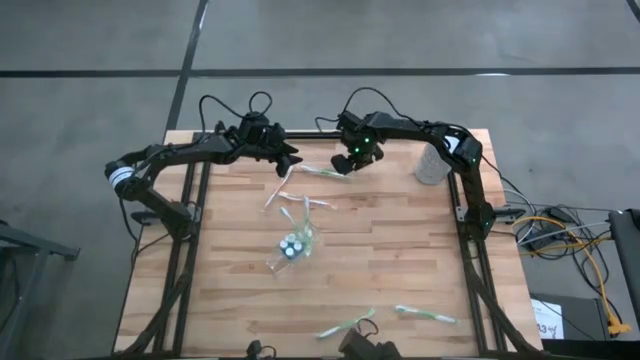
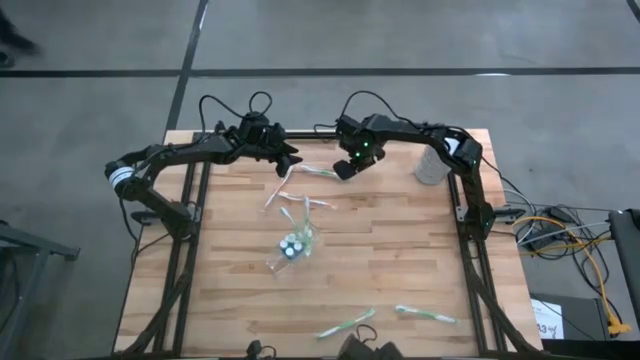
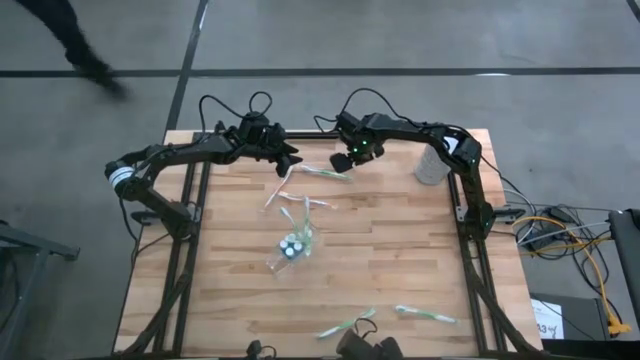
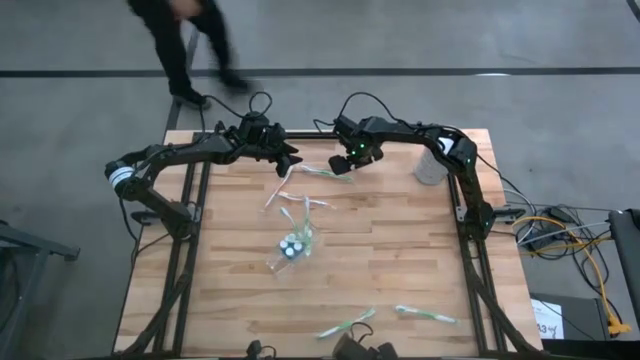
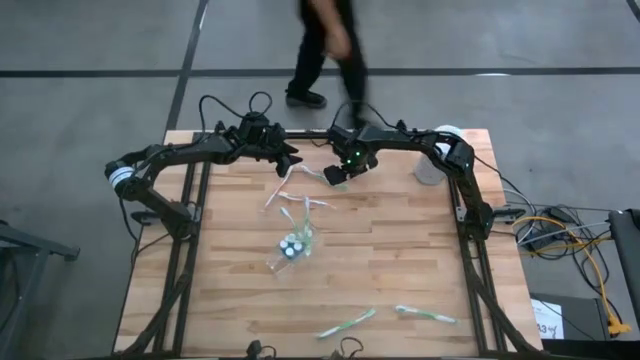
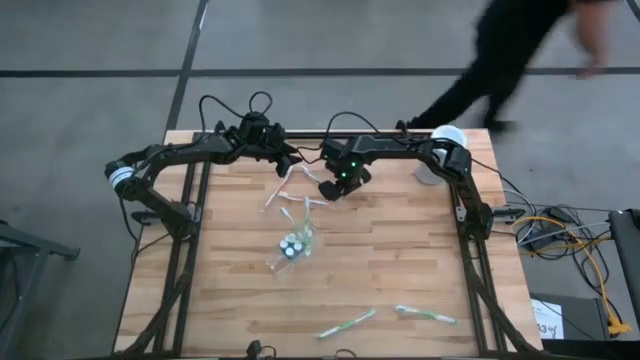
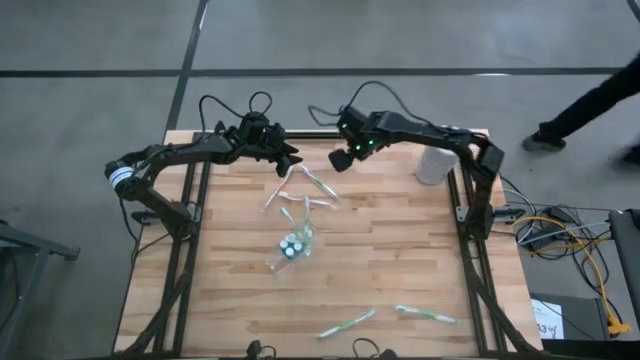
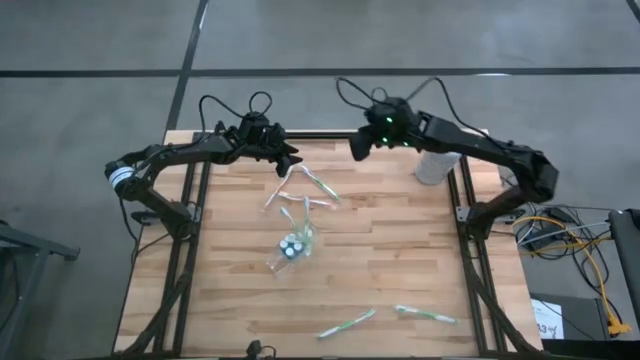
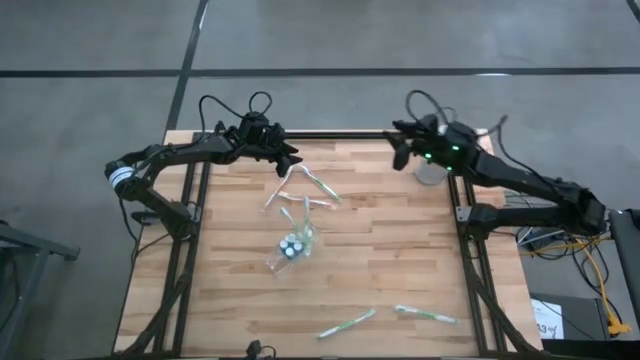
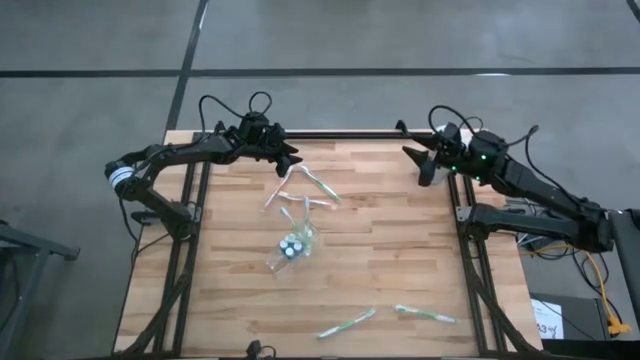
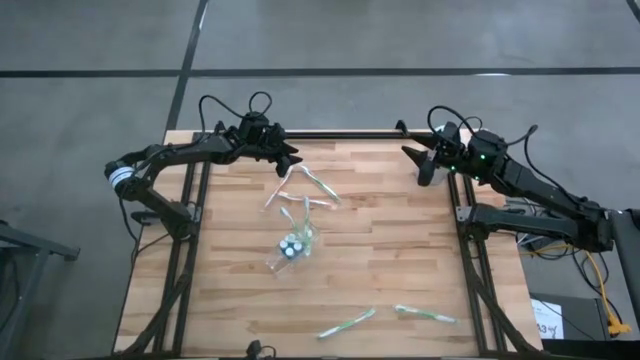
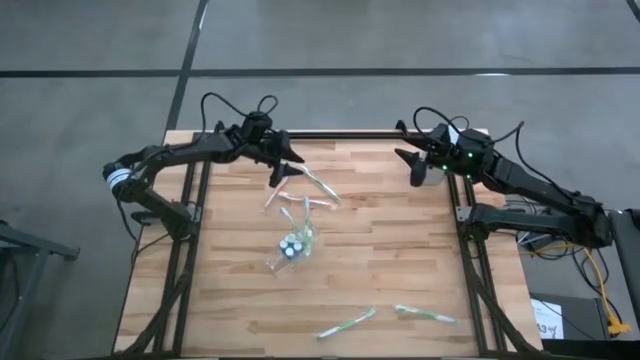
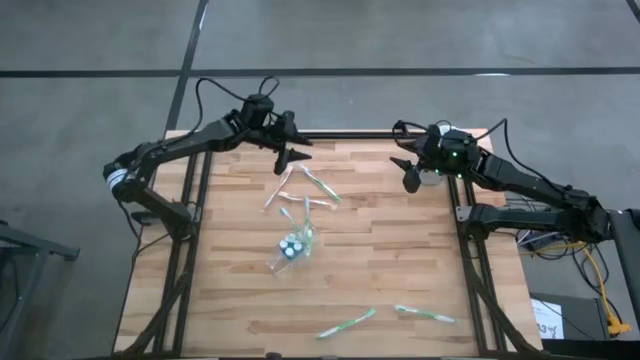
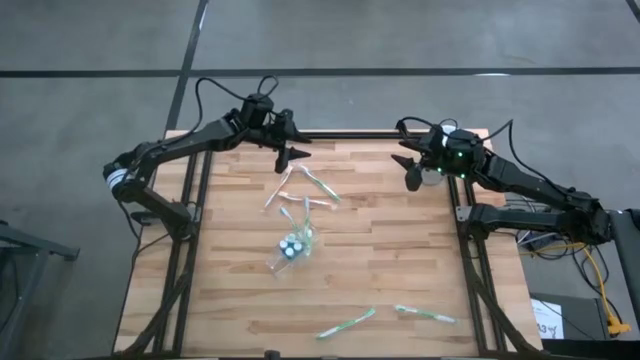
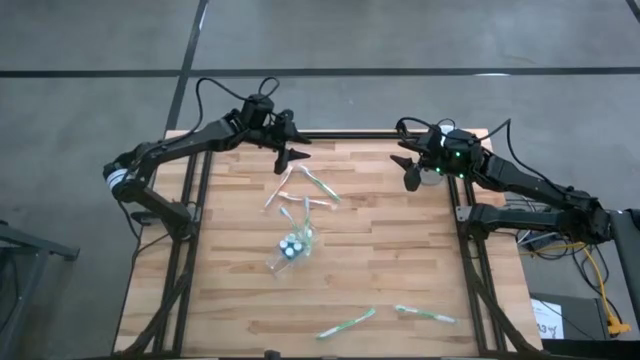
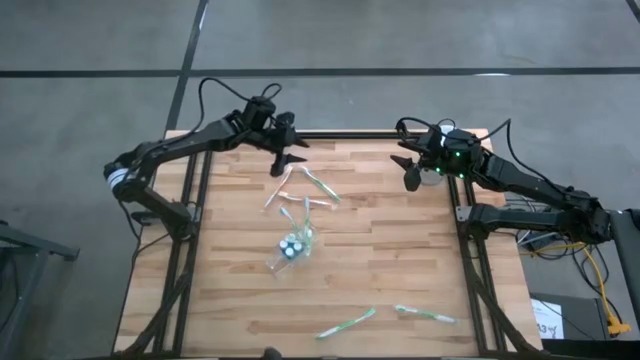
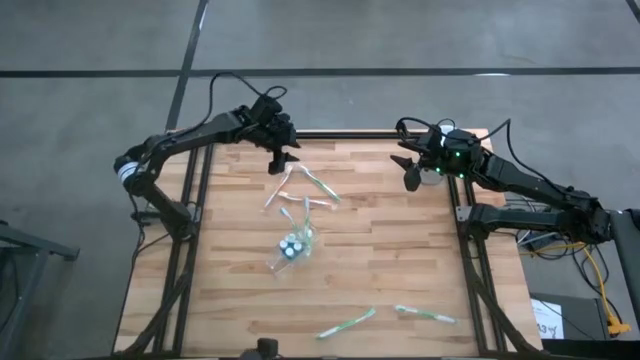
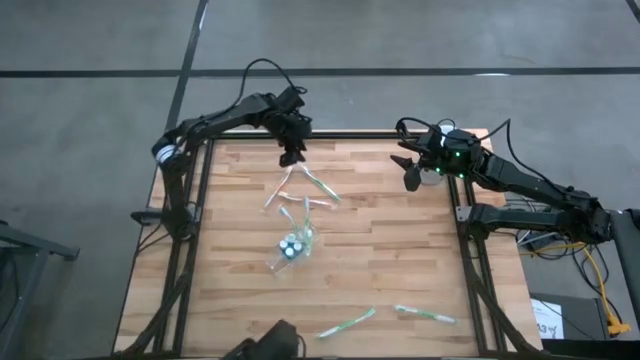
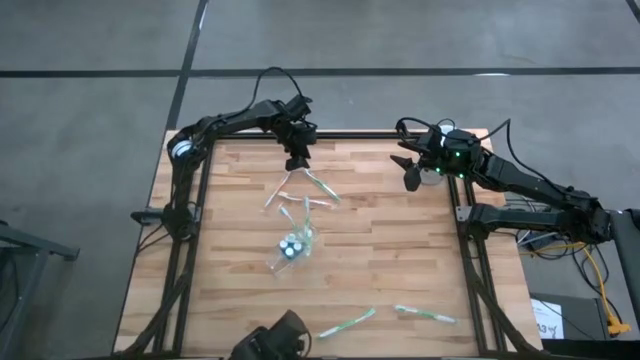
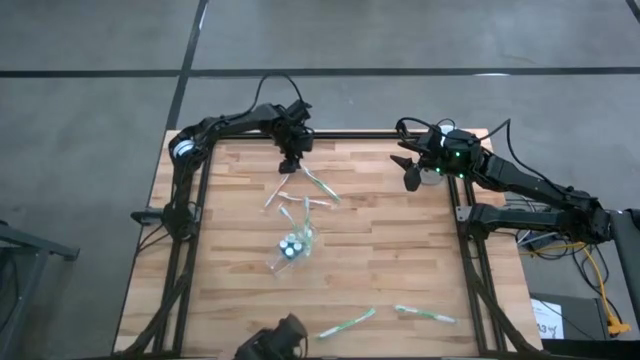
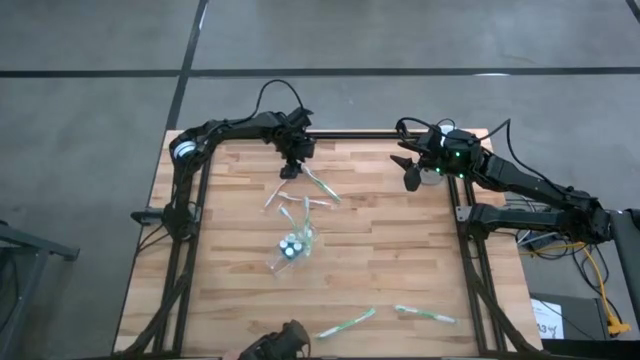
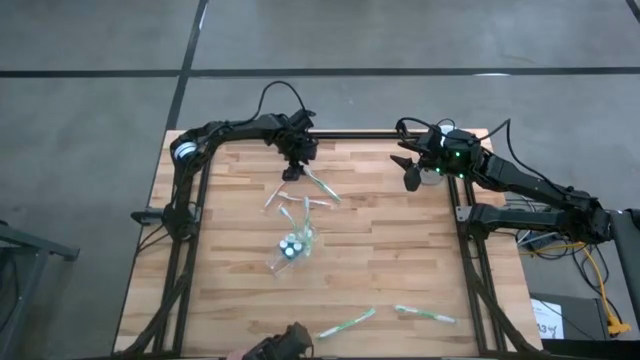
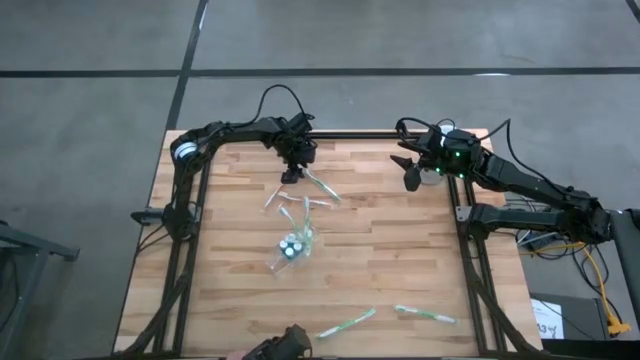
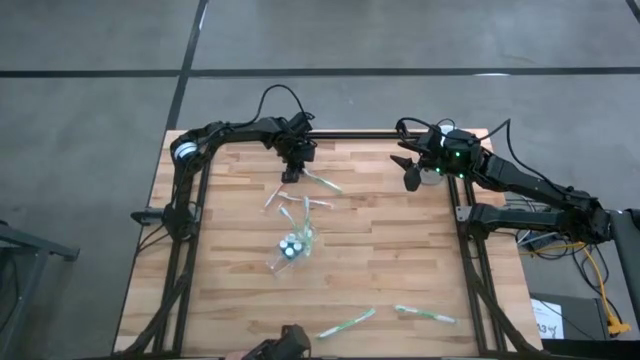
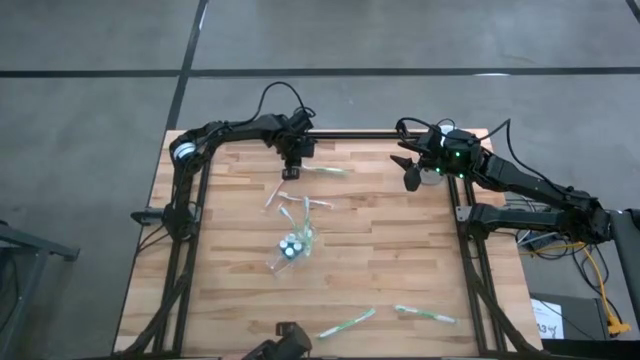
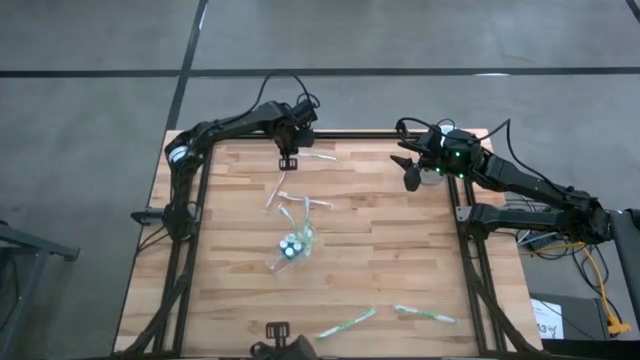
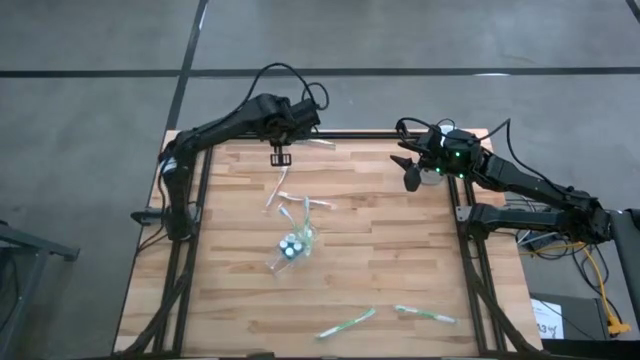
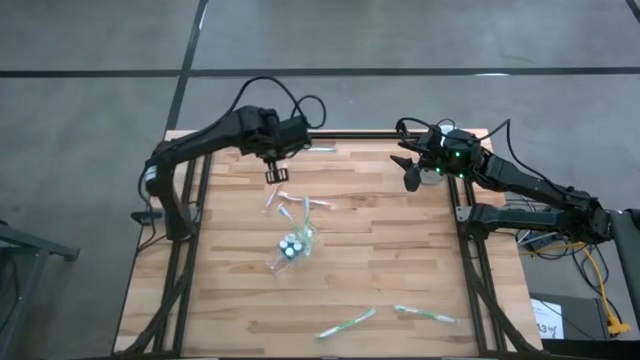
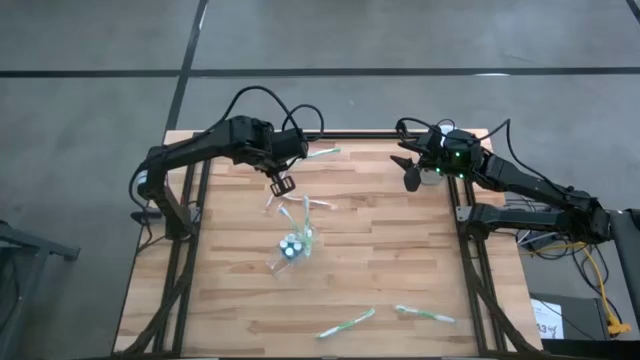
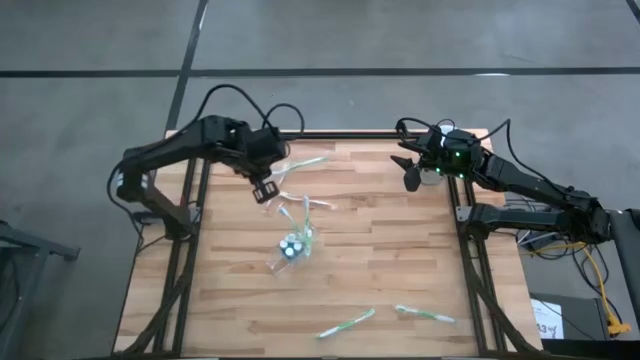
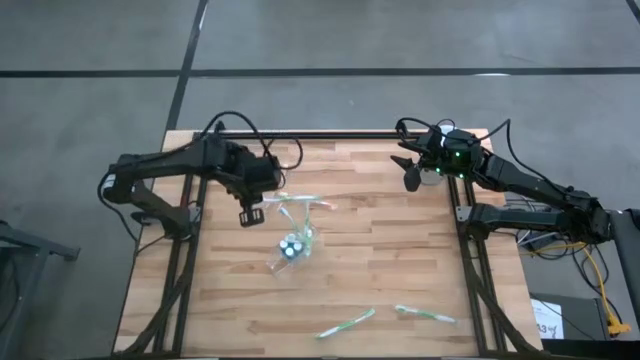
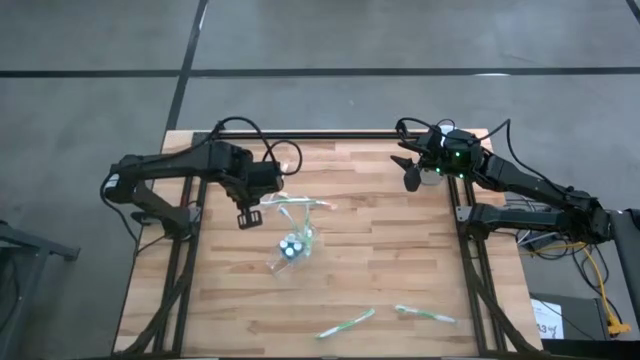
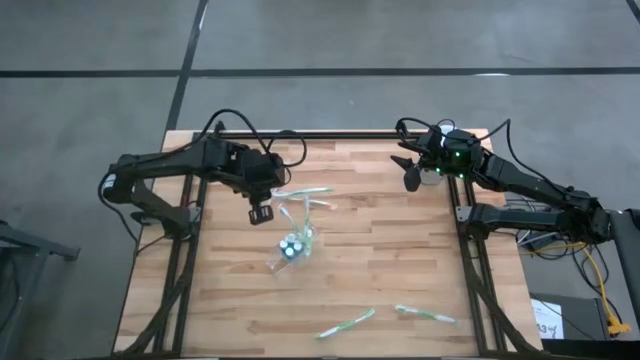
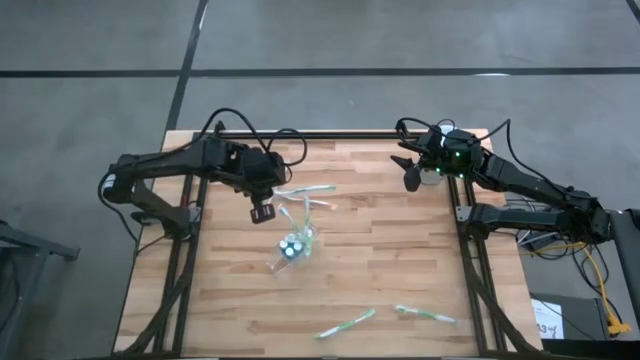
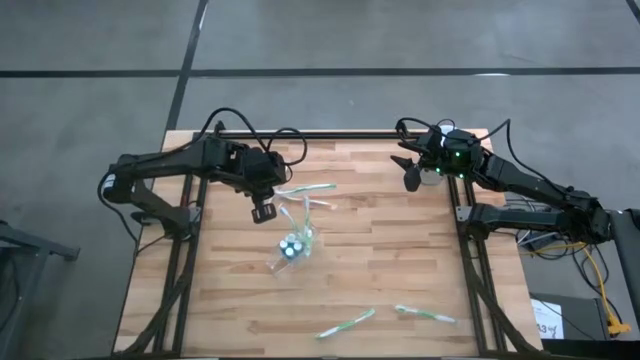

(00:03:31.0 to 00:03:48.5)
Task: Pick & Place toothbrushing station
Put the green toothbrush into the transparent organizer

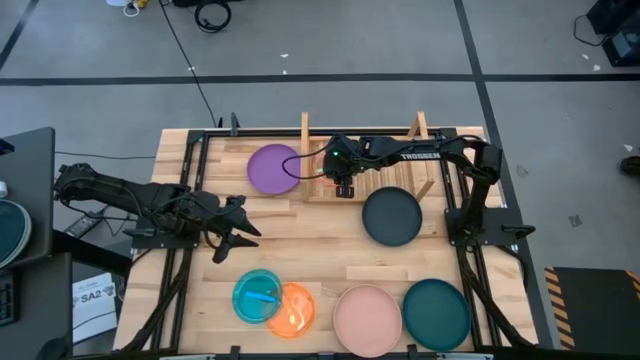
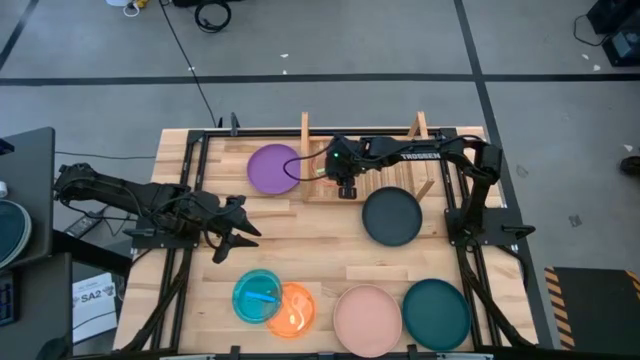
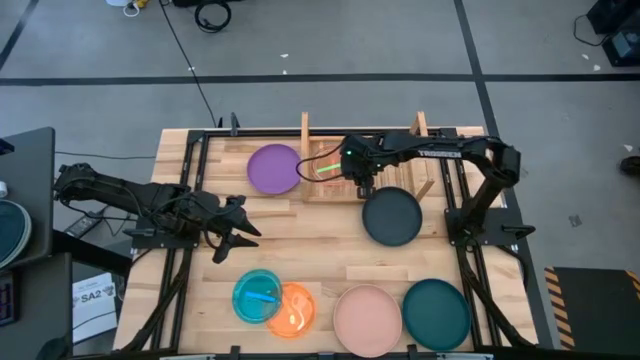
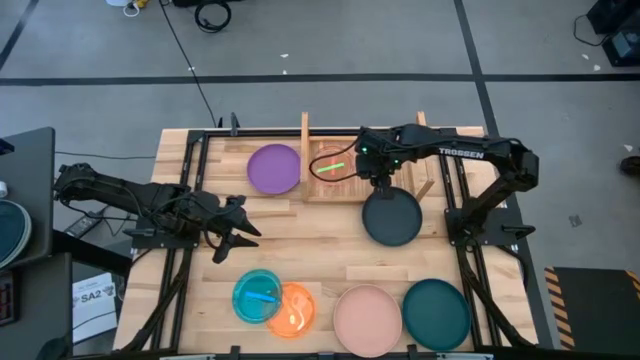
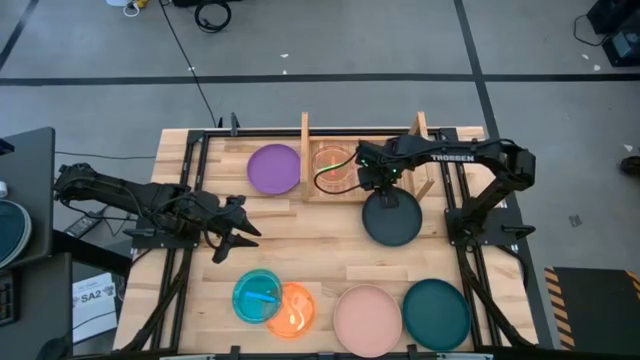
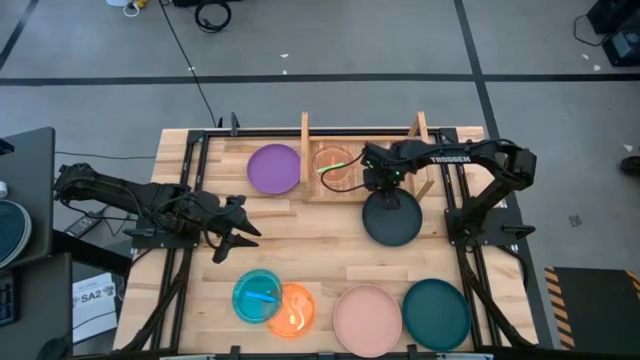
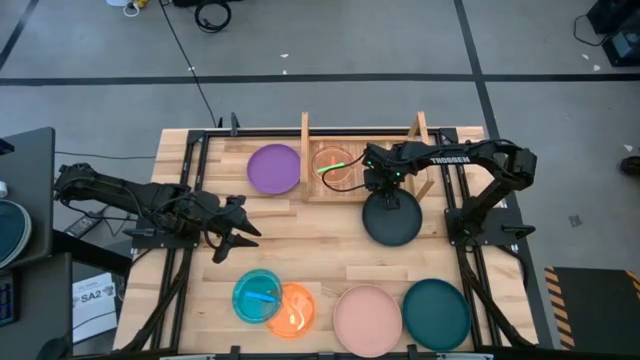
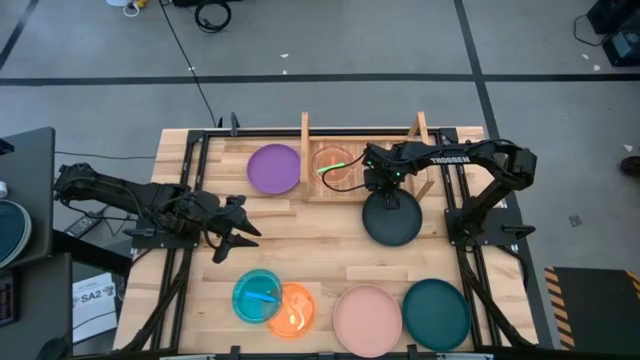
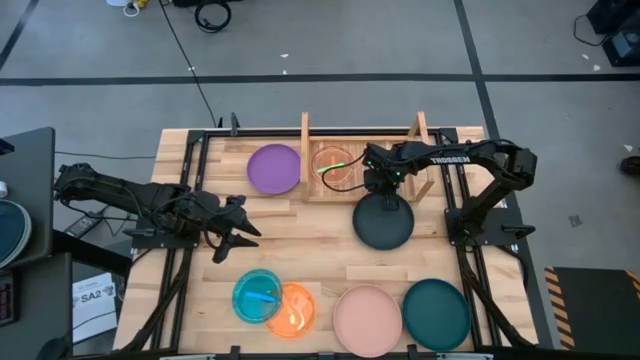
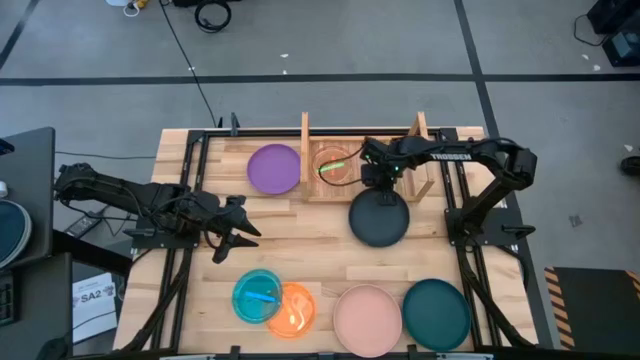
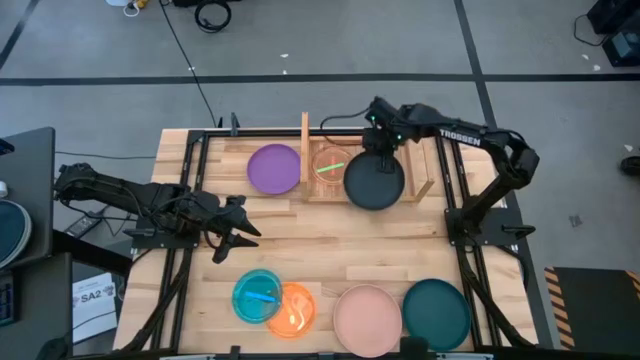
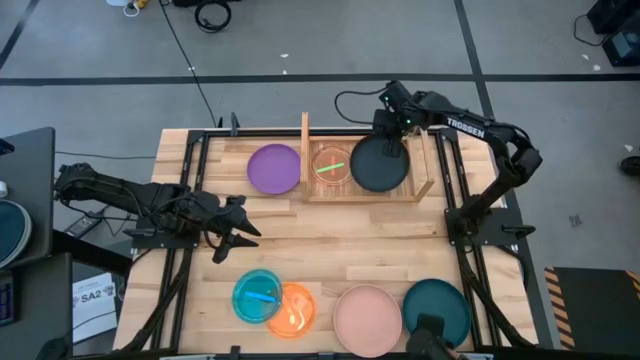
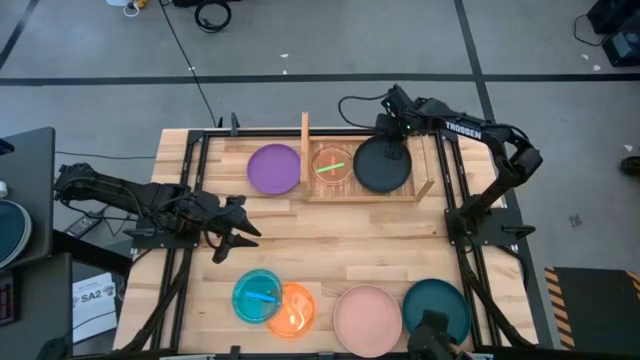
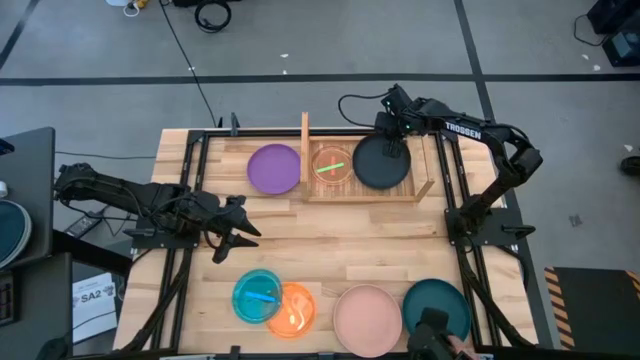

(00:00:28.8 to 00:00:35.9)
Task: Place and stack plates onto a shelf
Put the large black plate on the shelf
